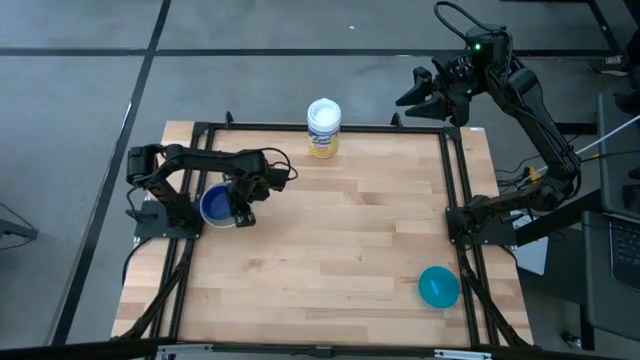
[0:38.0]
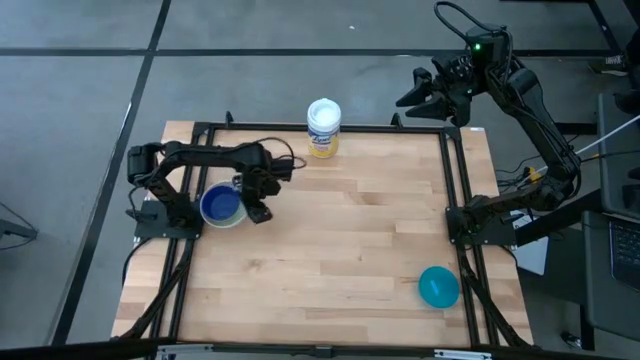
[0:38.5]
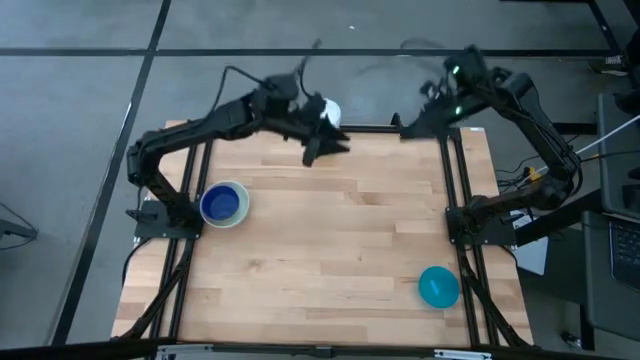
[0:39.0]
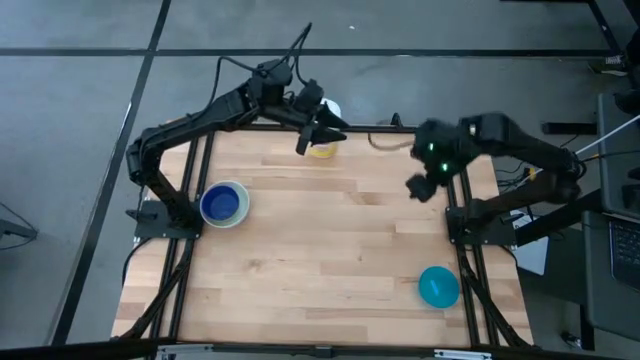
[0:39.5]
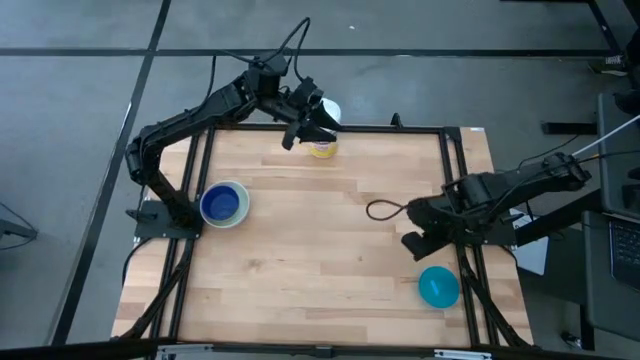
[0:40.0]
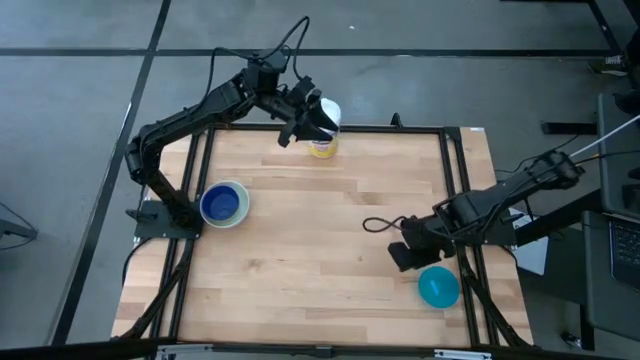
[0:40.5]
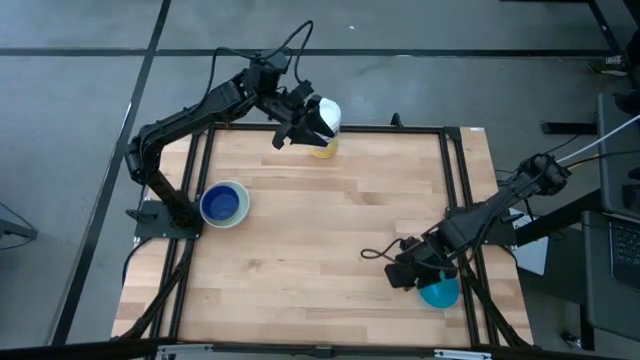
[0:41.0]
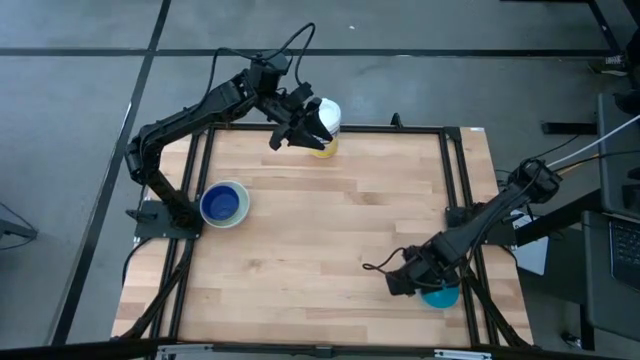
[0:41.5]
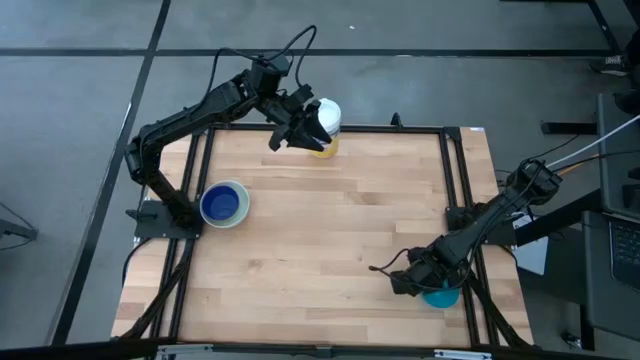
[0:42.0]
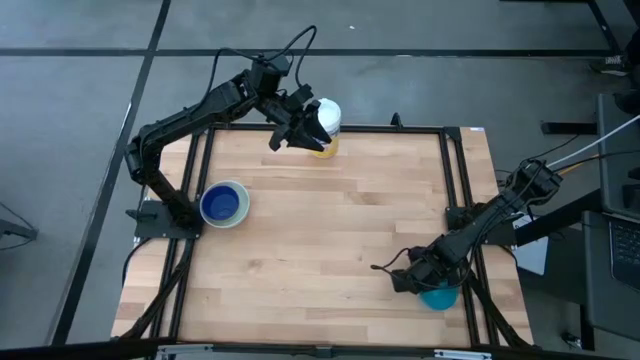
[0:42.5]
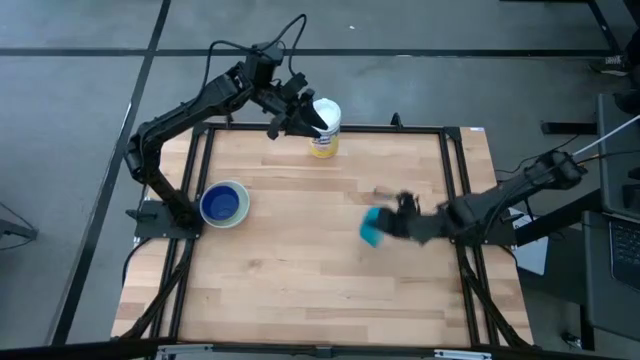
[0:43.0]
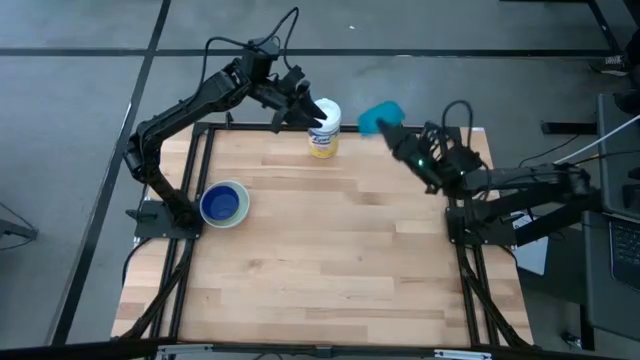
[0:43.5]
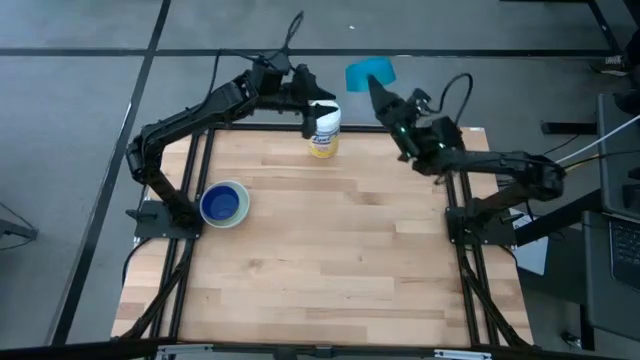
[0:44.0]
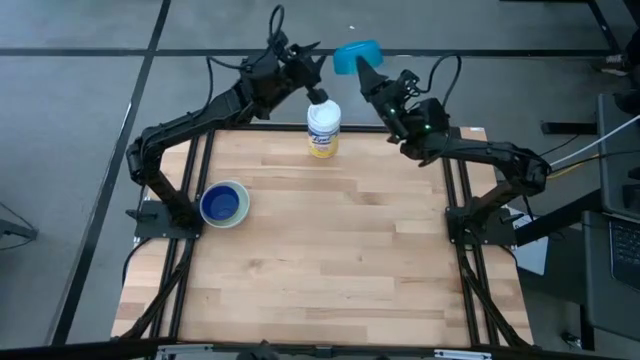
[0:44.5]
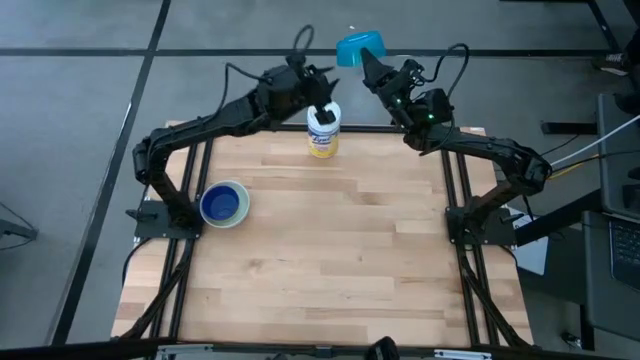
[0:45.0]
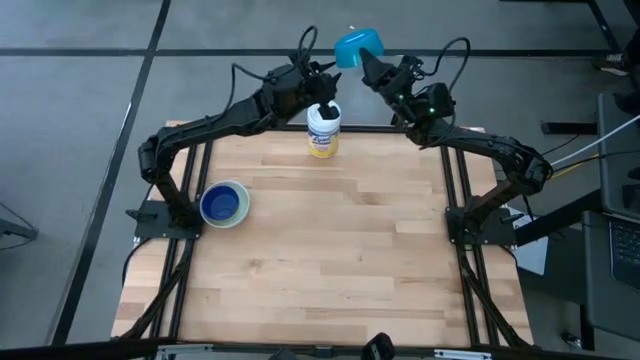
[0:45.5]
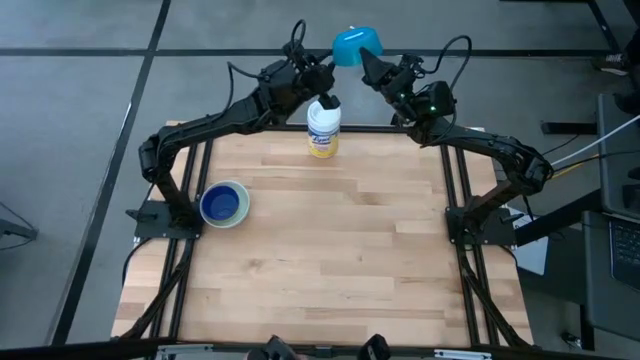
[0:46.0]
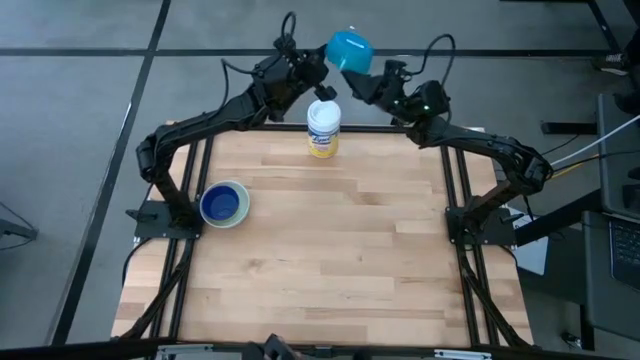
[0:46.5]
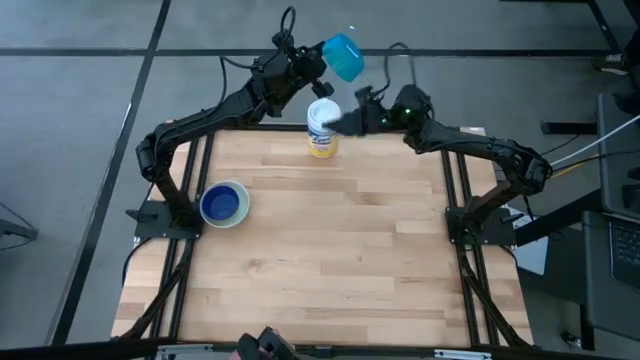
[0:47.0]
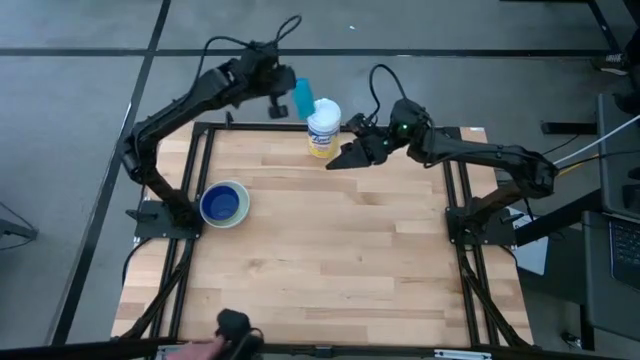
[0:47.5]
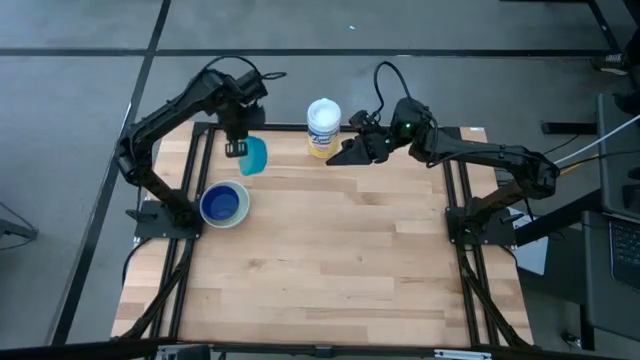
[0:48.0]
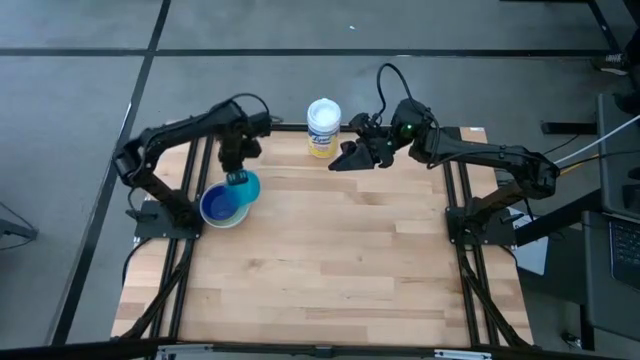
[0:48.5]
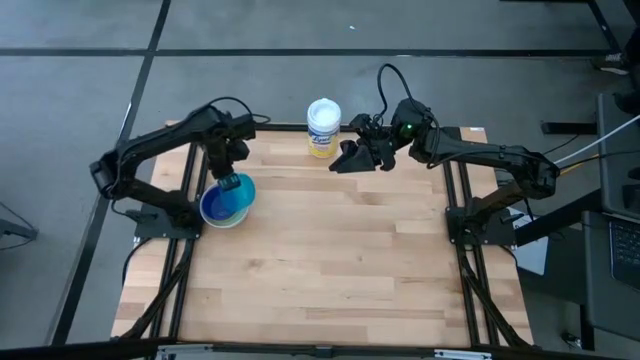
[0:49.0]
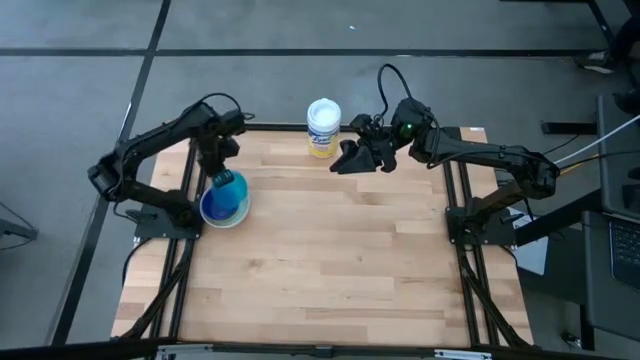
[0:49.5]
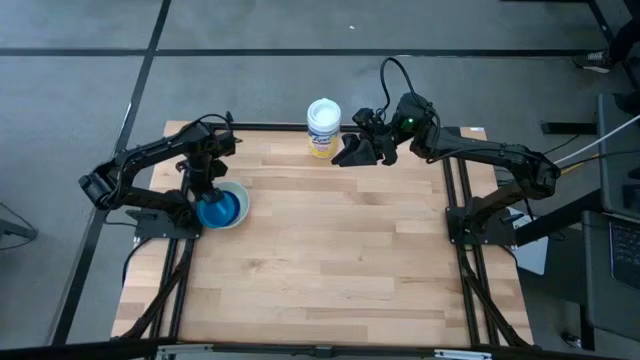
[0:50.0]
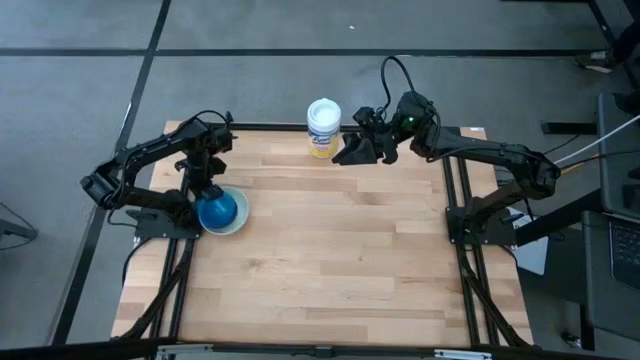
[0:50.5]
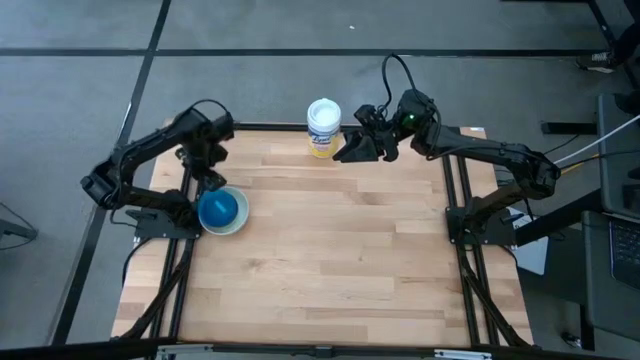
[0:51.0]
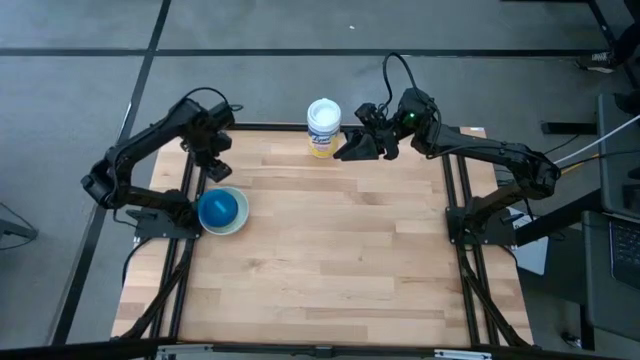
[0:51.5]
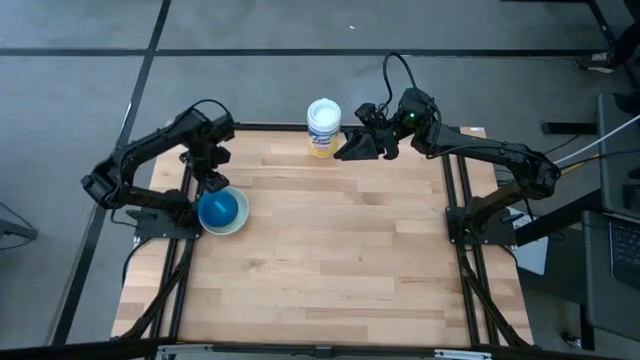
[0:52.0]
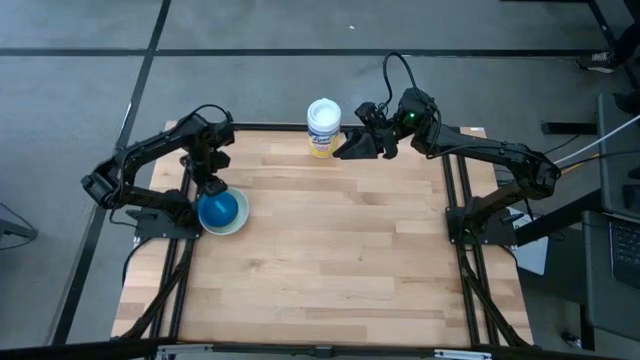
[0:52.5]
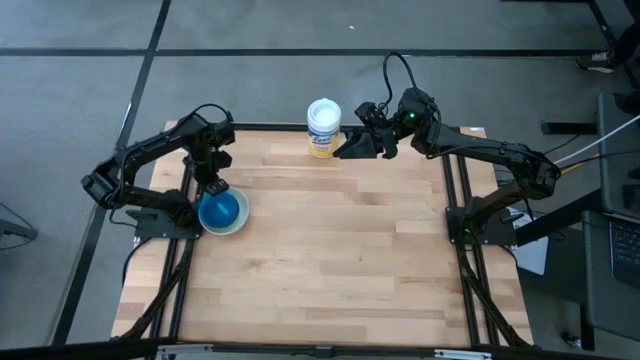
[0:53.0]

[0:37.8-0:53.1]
Stack the light blue bowl on top of the blue bowl

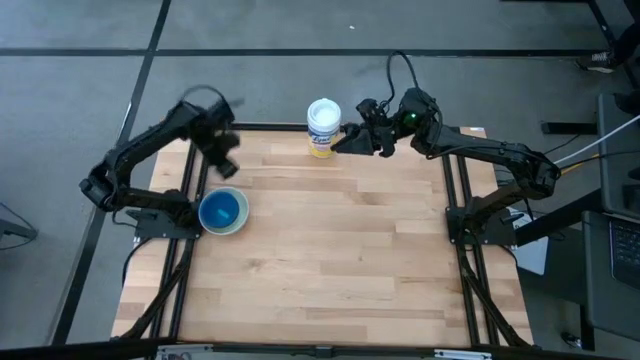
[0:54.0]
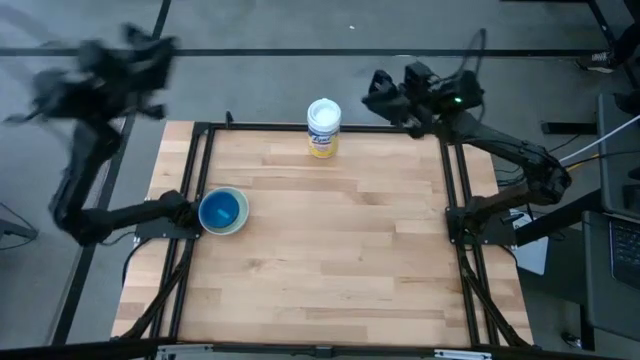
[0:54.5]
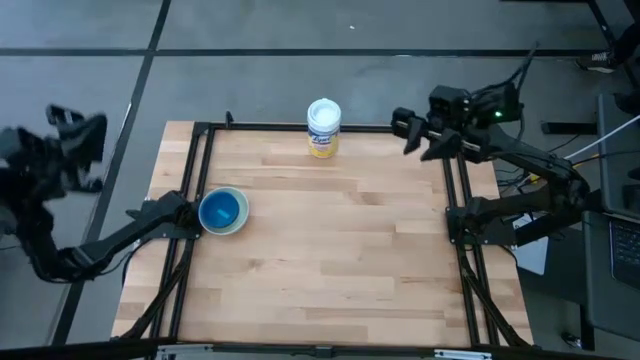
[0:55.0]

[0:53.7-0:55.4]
Return to Home Position
